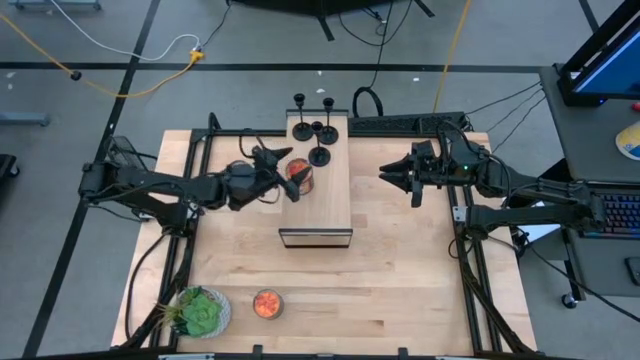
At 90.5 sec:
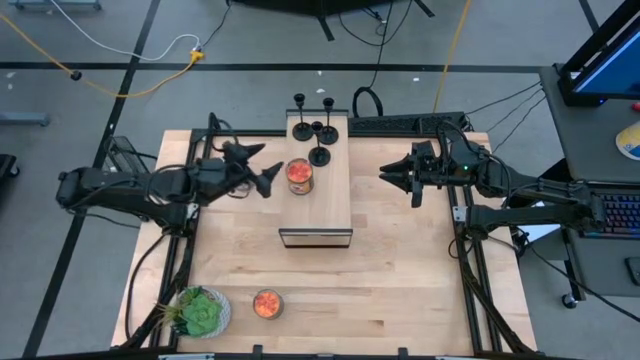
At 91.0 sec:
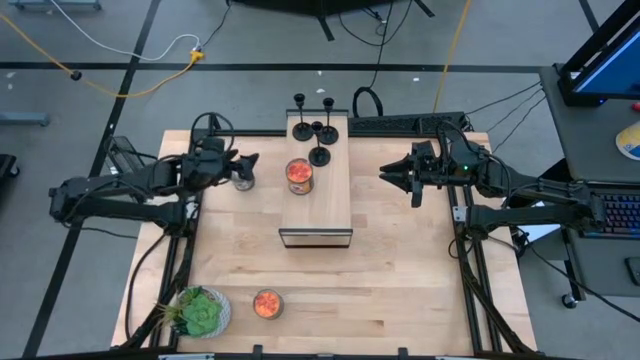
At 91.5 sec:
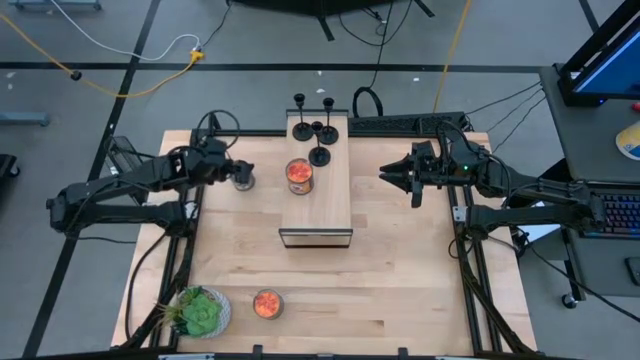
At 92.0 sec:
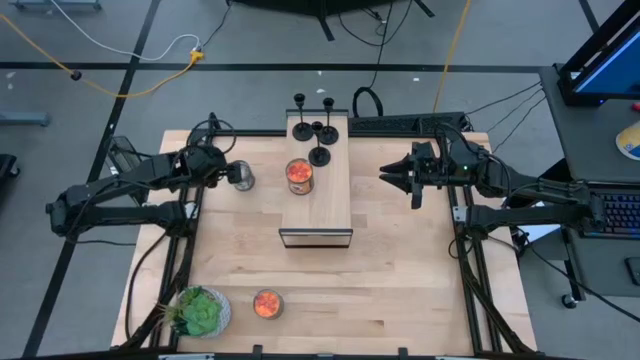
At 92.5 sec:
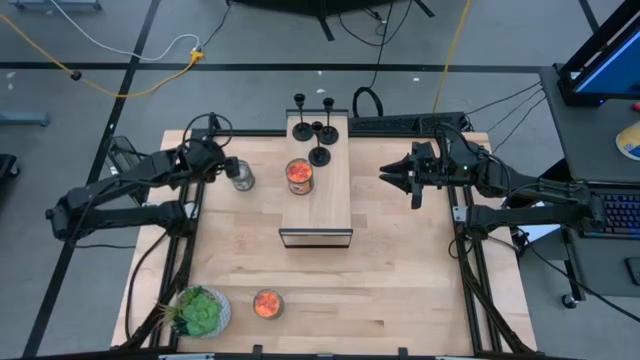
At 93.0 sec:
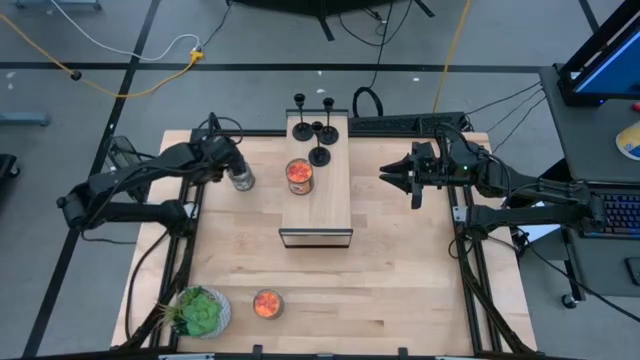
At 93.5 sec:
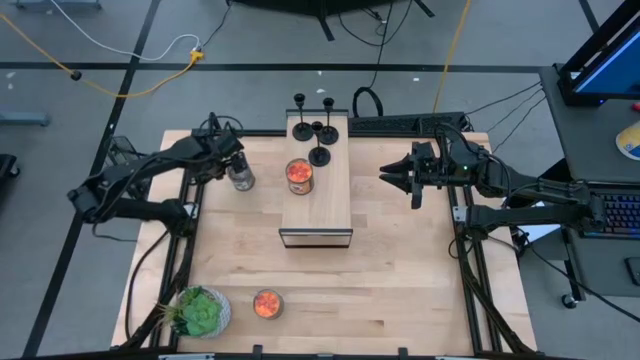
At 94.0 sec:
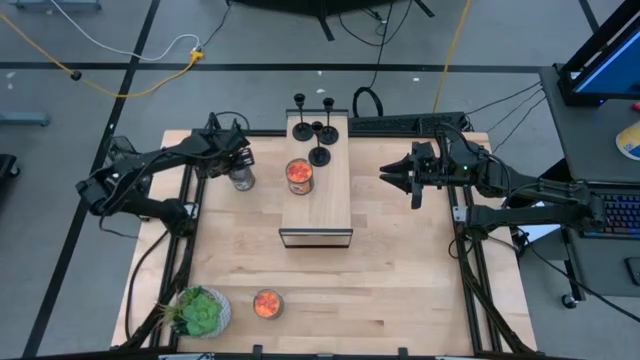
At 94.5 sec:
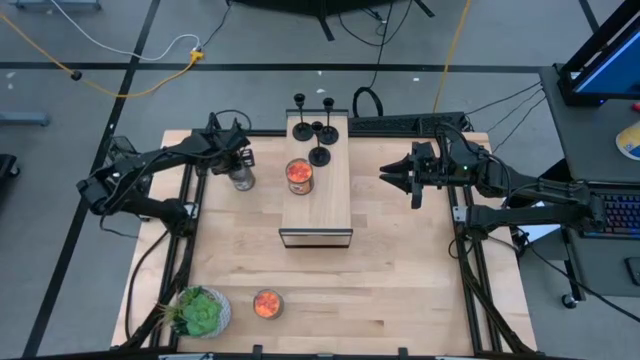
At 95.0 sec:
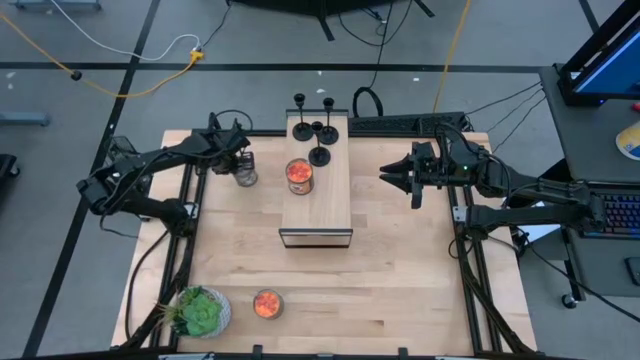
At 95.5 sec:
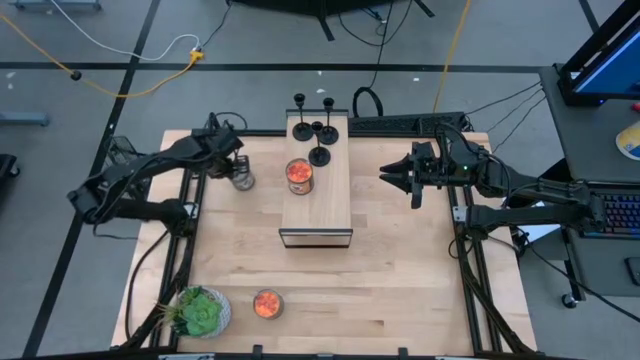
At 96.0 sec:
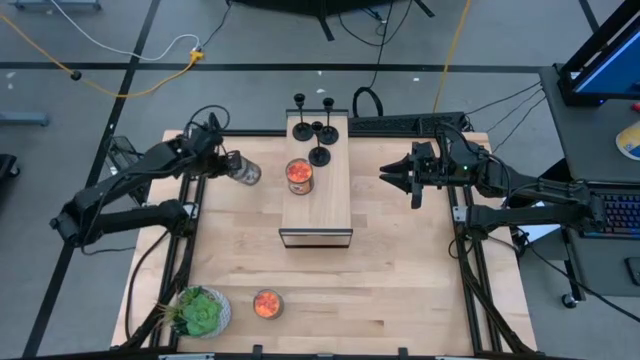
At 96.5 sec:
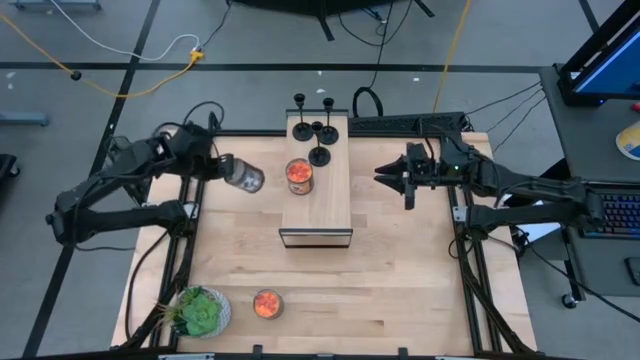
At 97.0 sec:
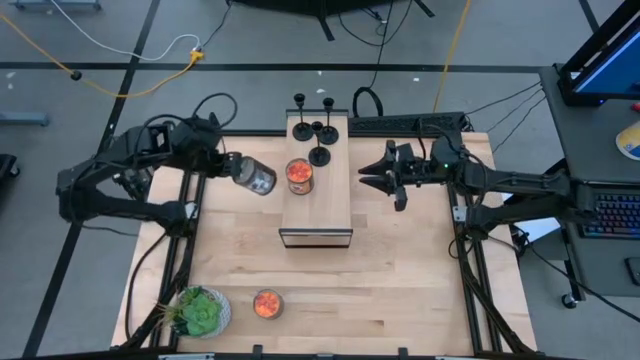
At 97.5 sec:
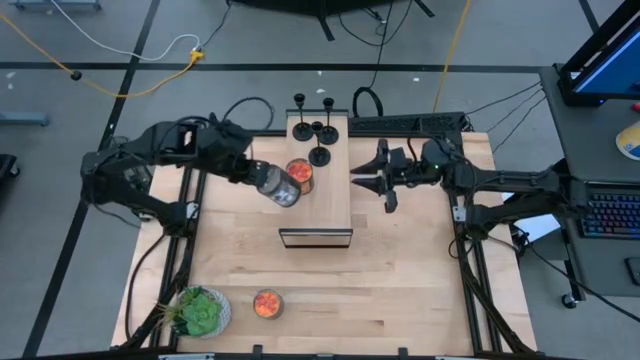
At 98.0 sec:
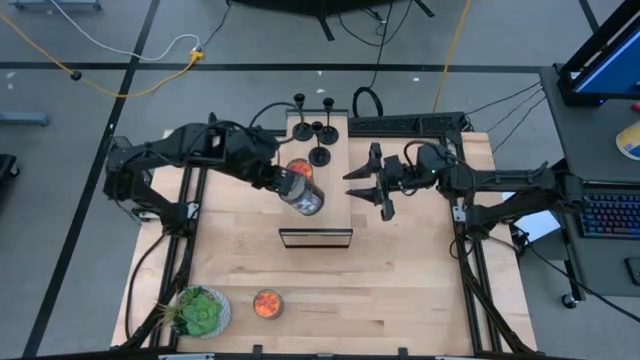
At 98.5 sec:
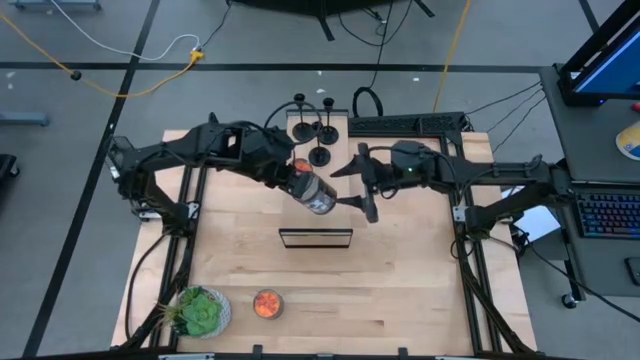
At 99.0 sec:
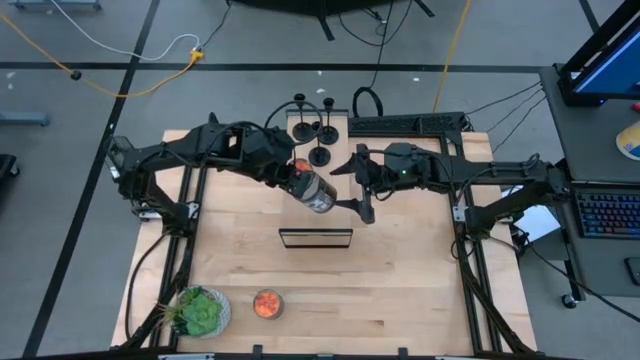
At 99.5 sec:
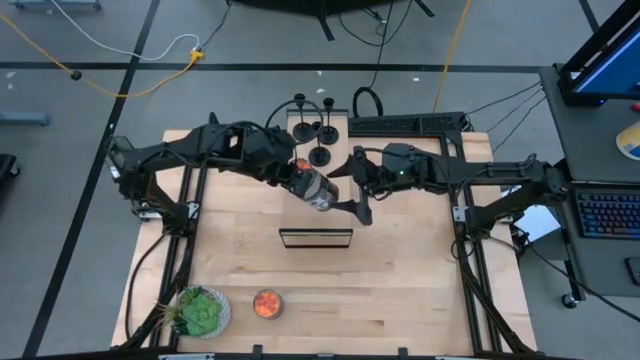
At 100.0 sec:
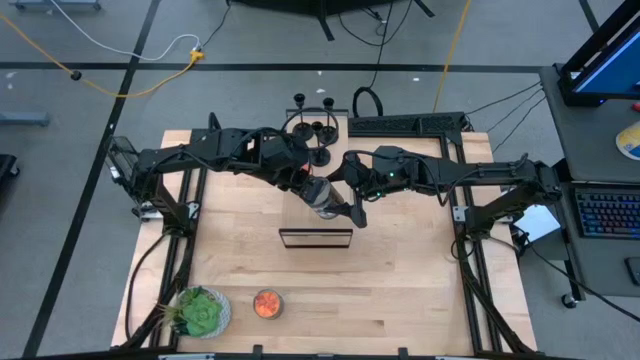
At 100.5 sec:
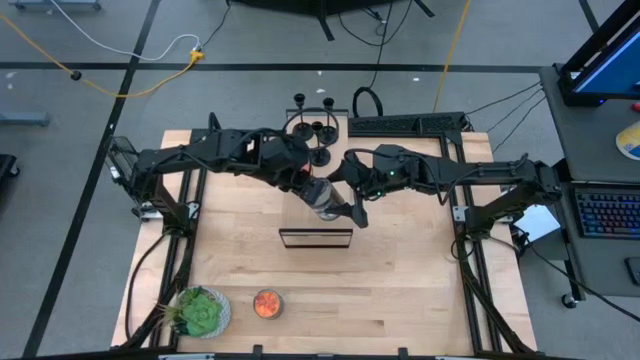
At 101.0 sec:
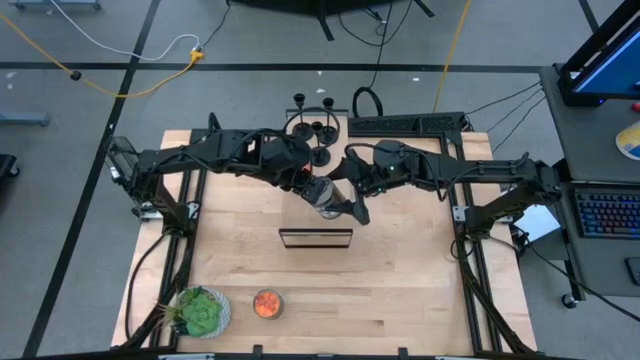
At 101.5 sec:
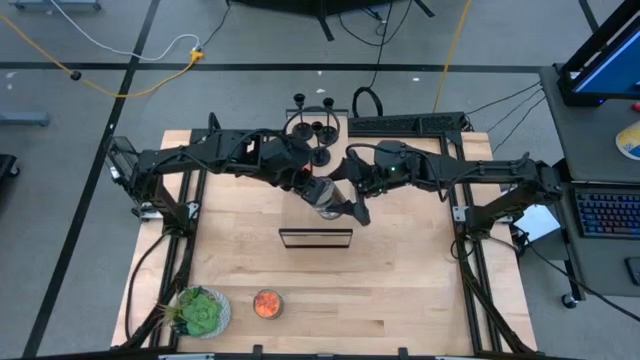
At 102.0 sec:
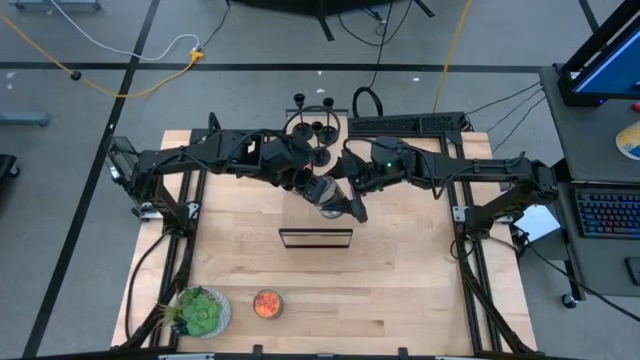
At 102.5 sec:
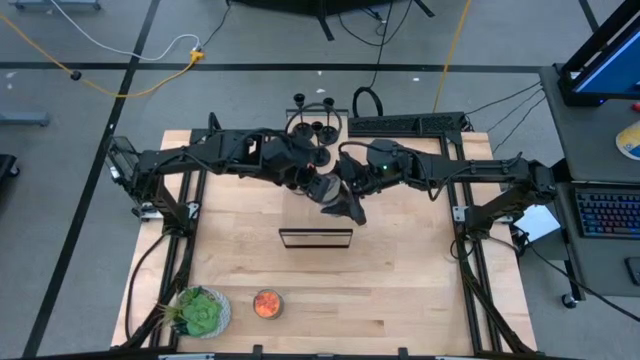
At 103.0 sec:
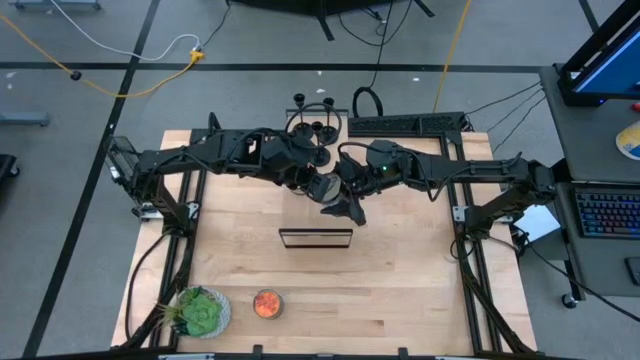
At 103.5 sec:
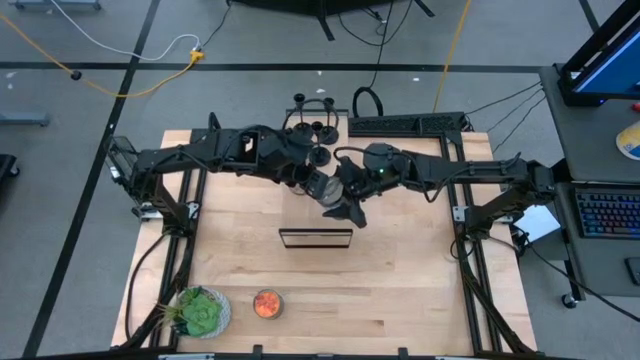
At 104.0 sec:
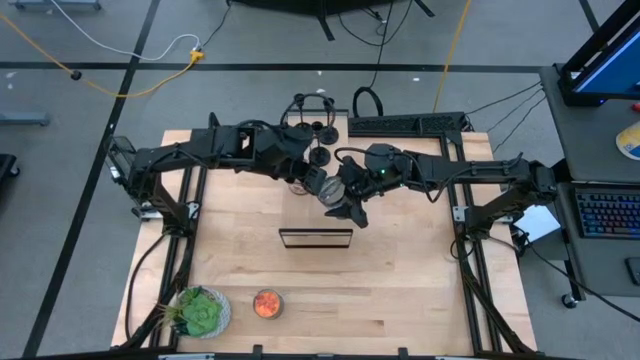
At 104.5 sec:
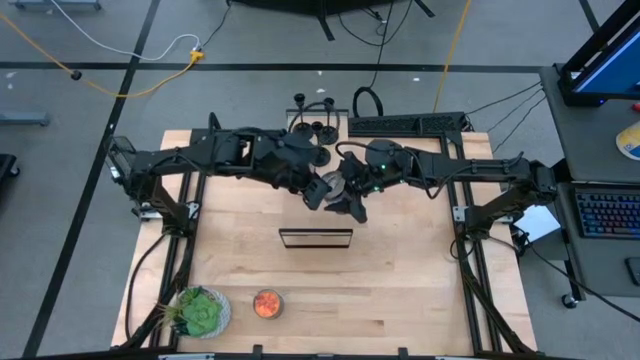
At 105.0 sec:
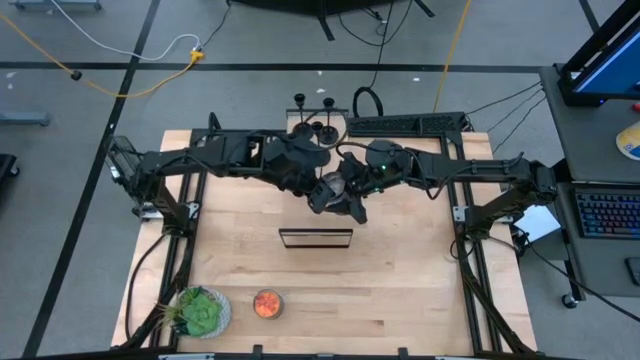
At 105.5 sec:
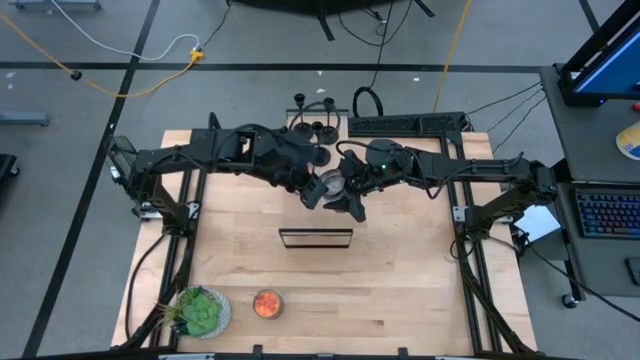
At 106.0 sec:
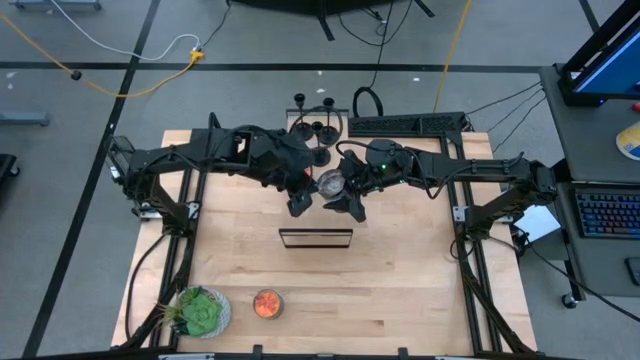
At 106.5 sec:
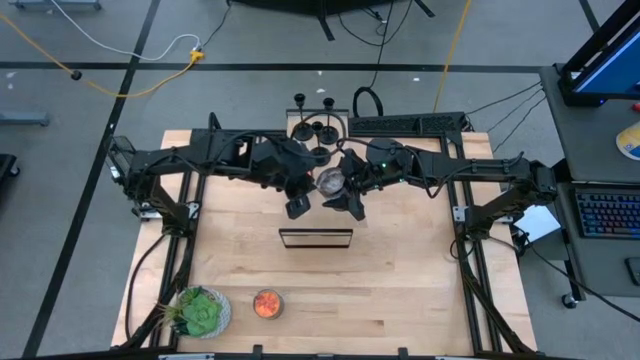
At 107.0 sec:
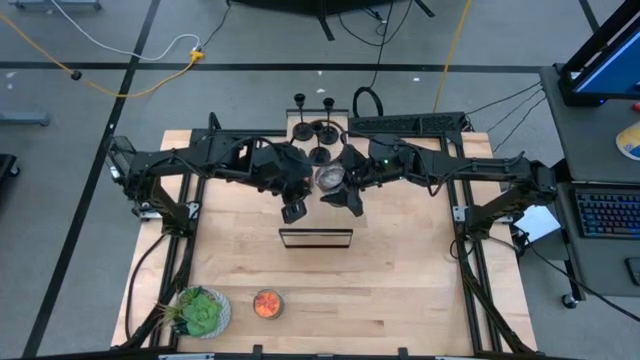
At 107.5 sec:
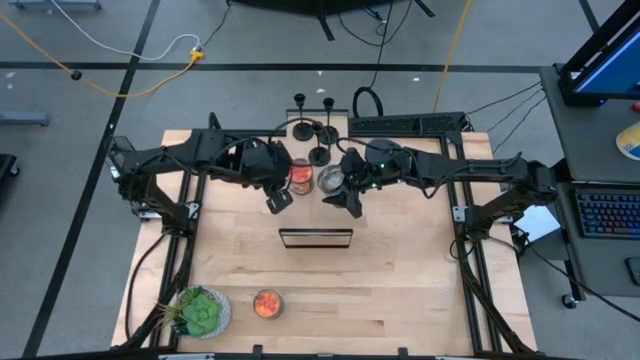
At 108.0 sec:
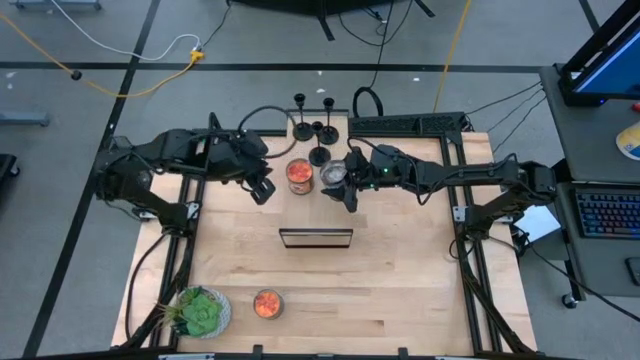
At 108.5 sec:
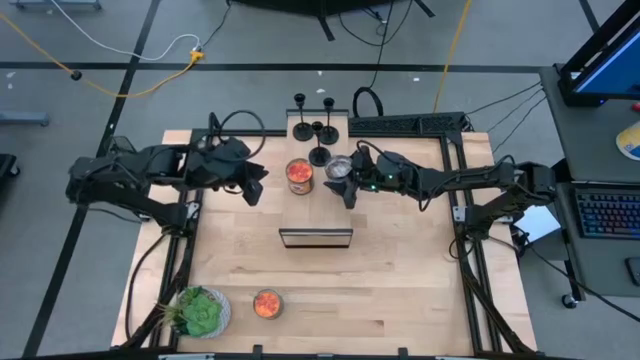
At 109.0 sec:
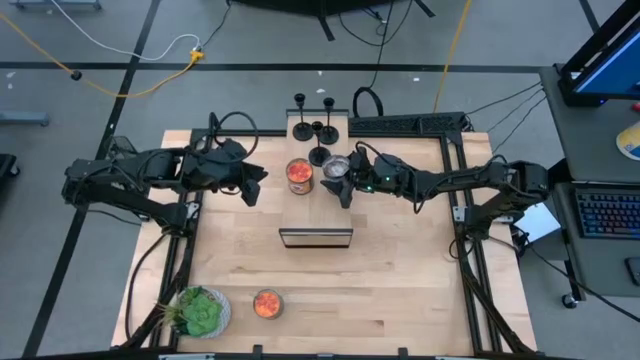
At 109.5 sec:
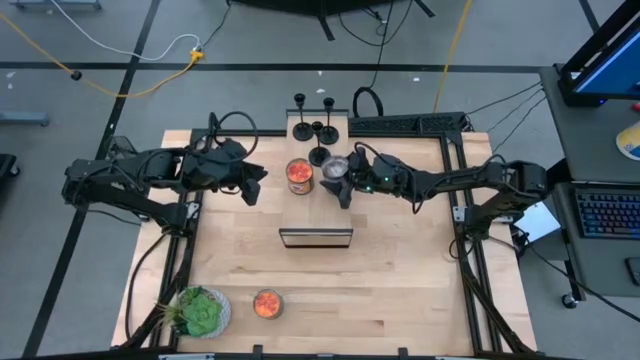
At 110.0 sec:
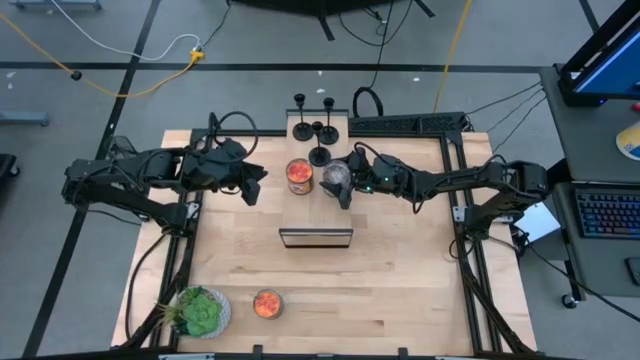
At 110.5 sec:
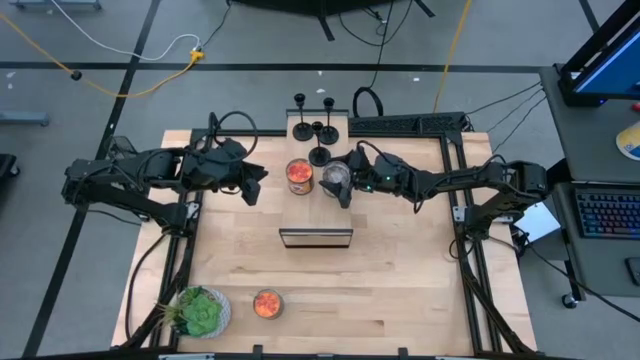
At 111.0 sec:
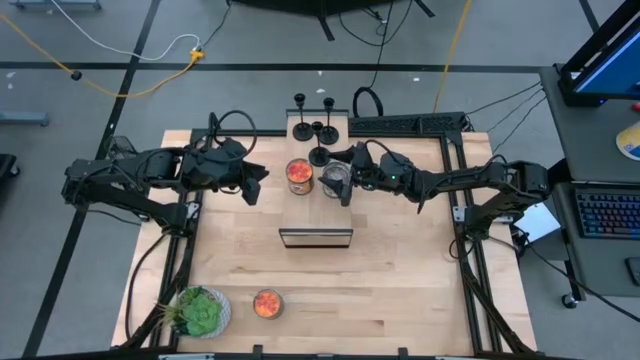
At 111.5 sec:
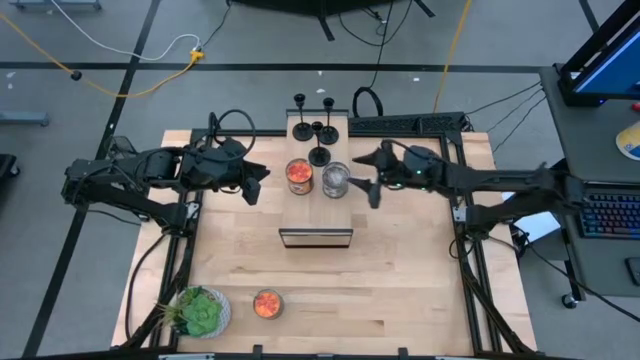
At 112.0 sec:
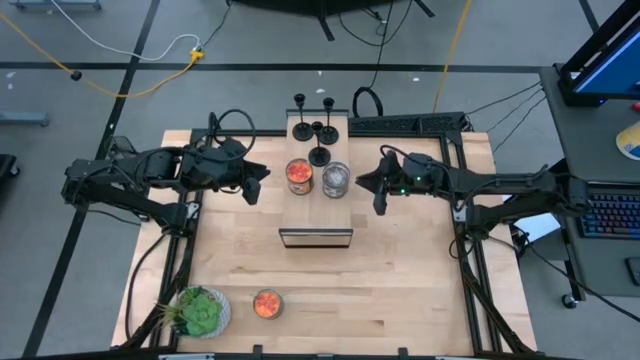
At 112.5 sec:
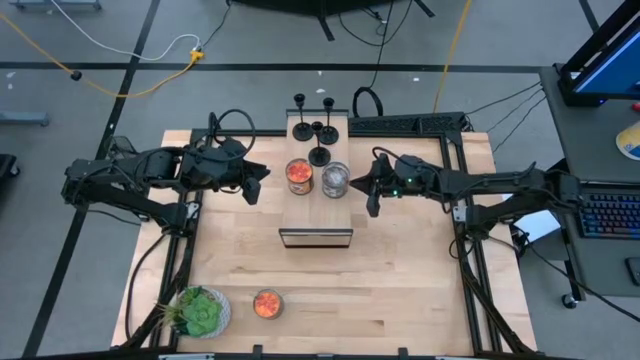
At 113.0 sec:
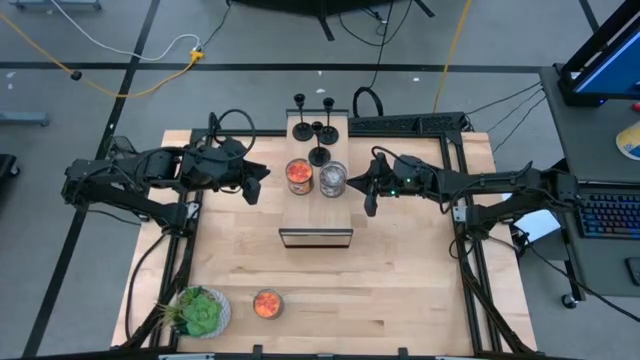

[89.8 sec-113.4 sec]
Task: Pick & Place candle stick holders
Put the brown scented candle on the shelf
